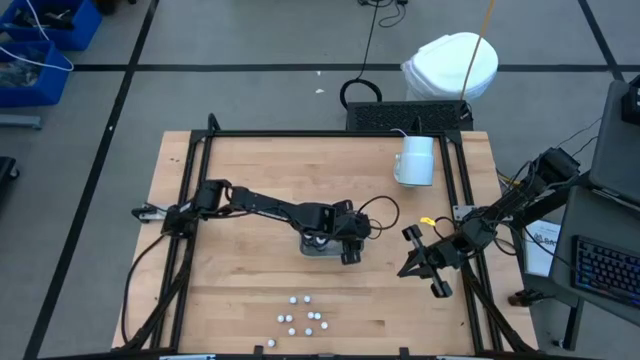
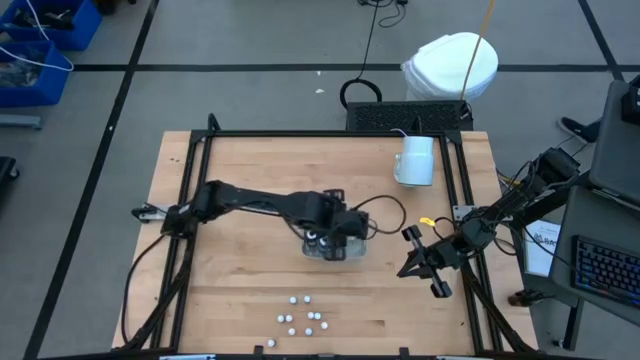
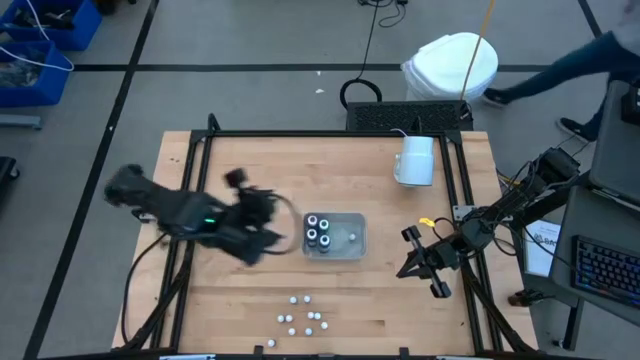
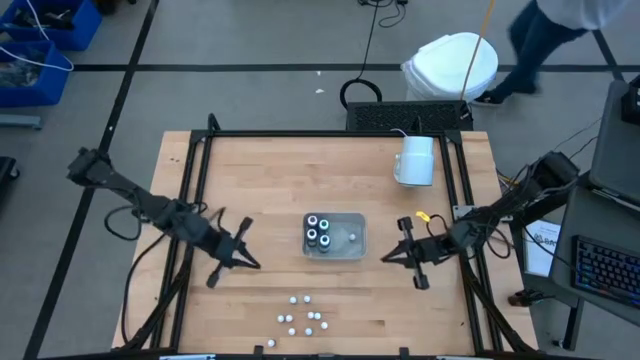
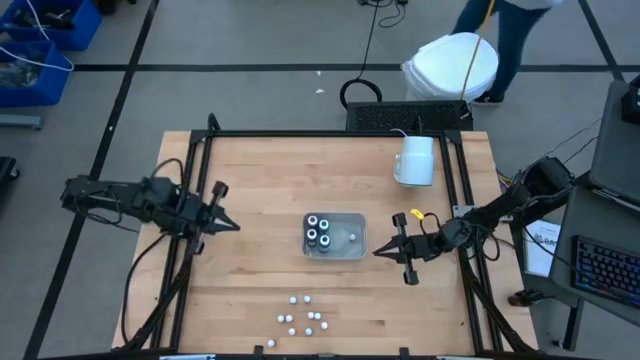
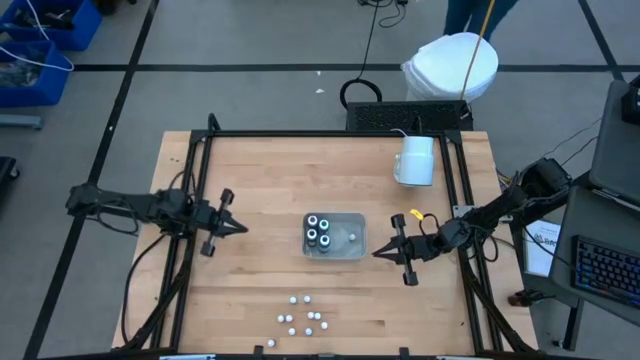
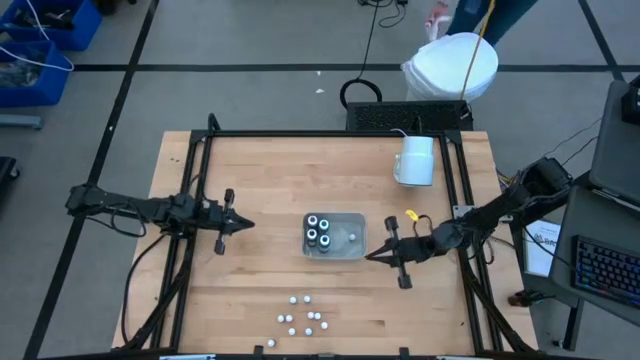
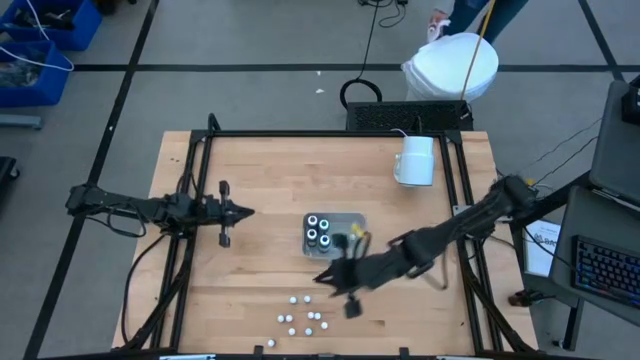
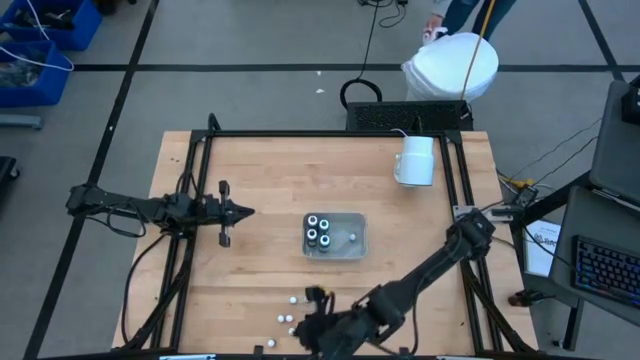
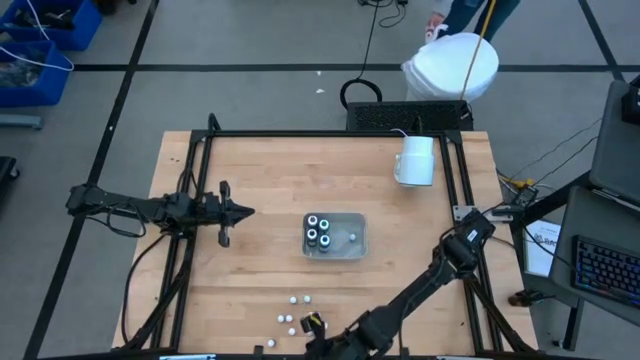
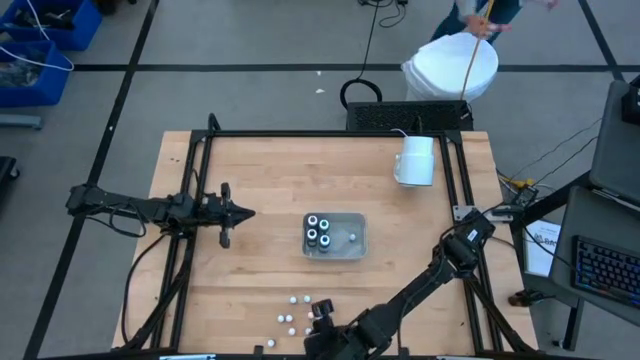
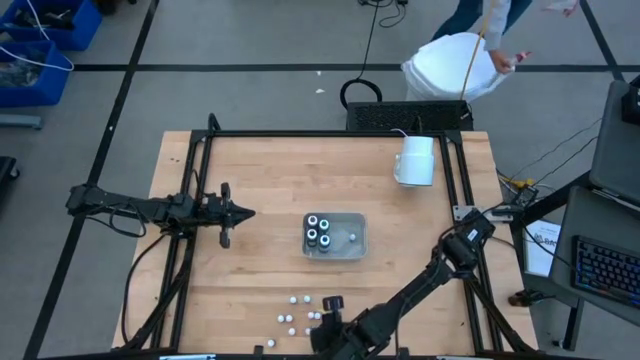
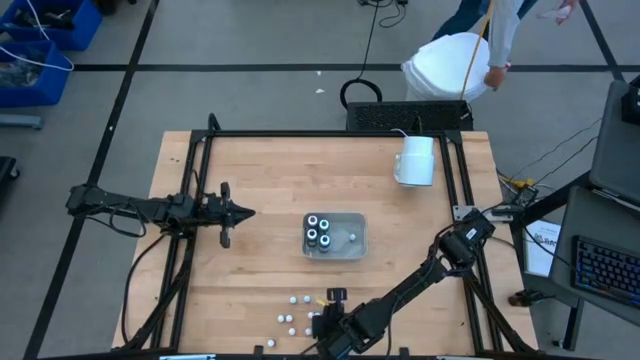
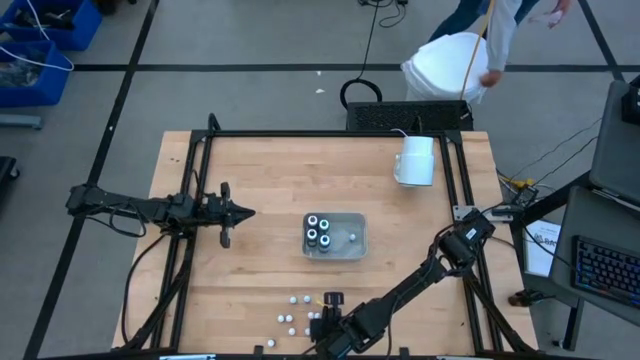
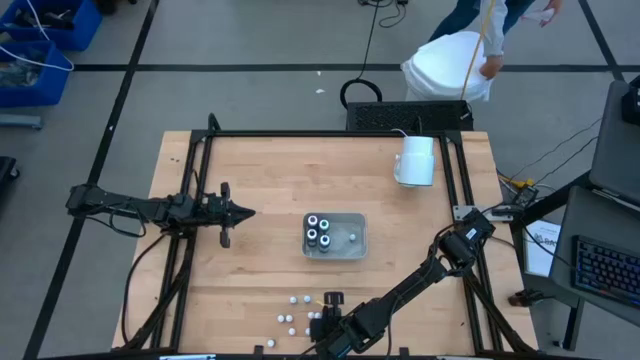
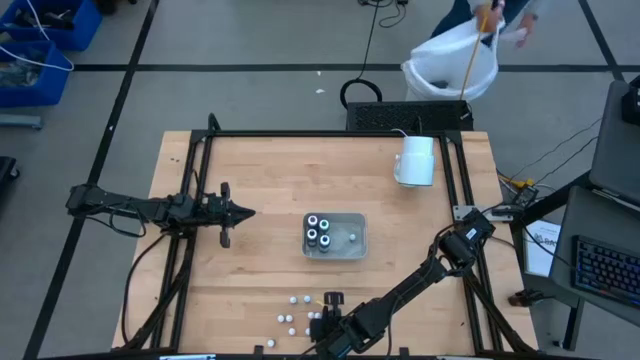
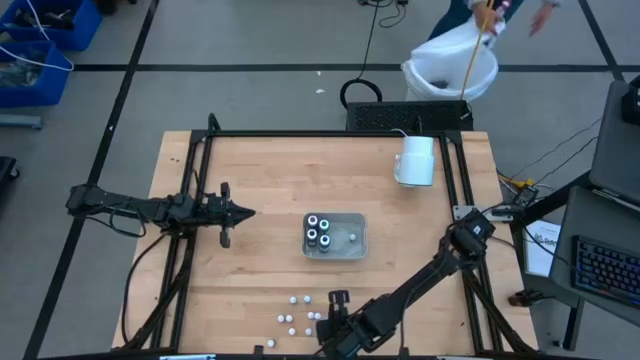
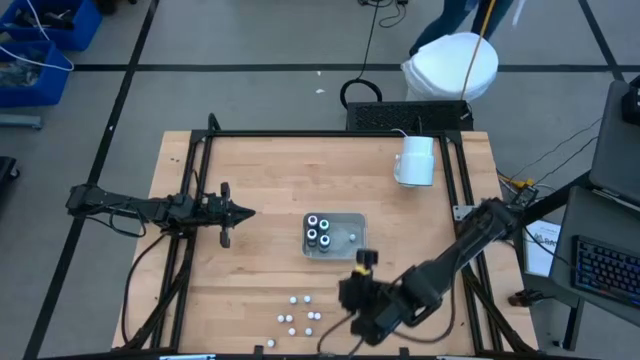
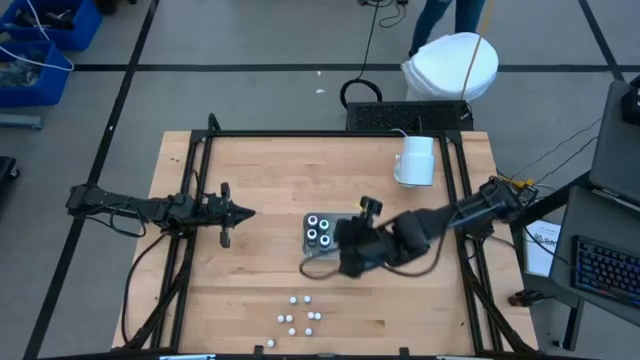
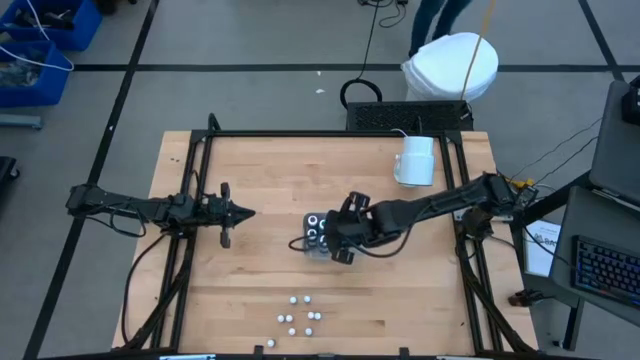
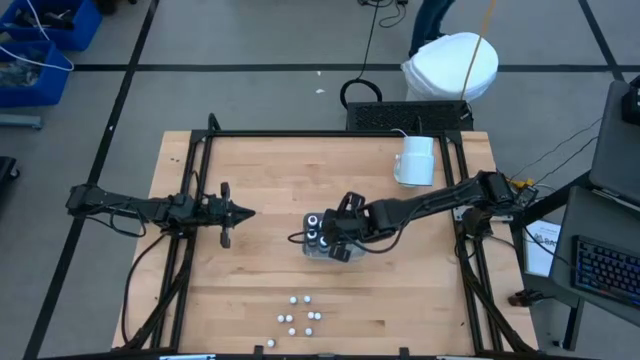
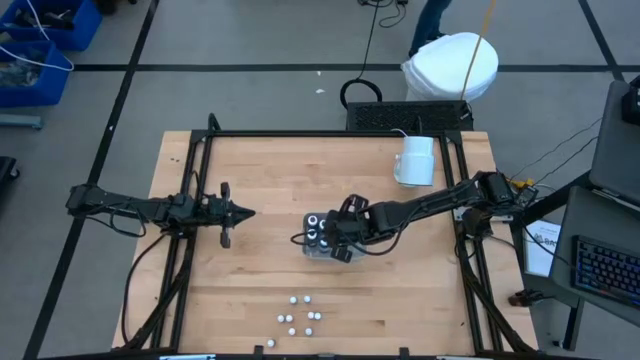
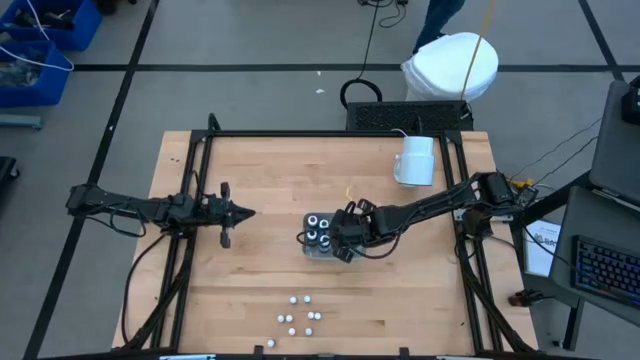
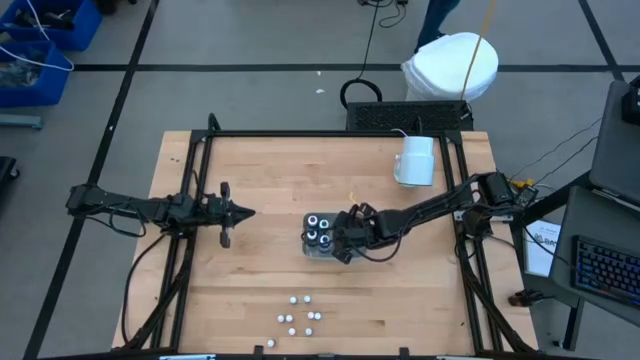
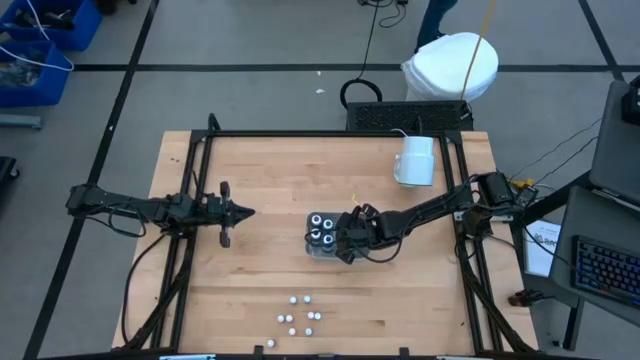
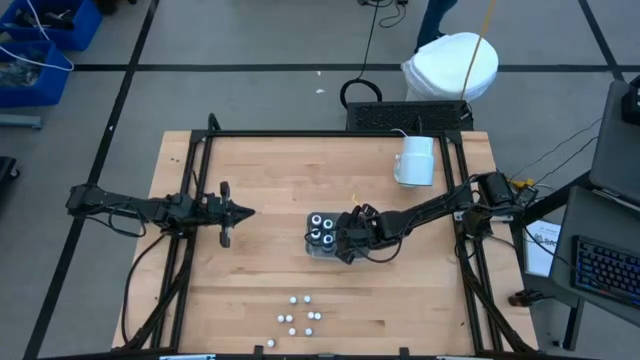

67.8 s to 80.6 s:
Task: Pick & Place food coloring
Put the small orange food coloring into the gray bin

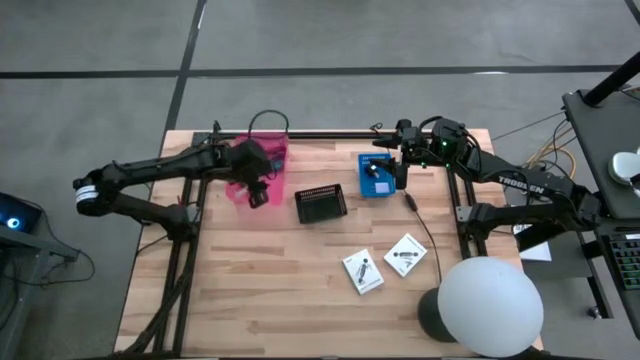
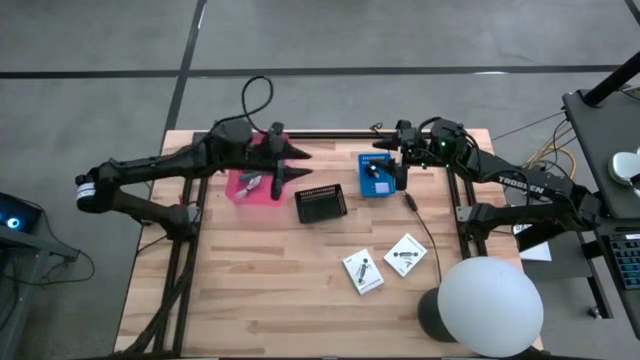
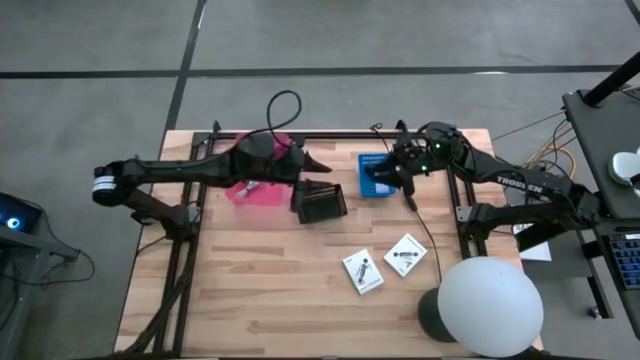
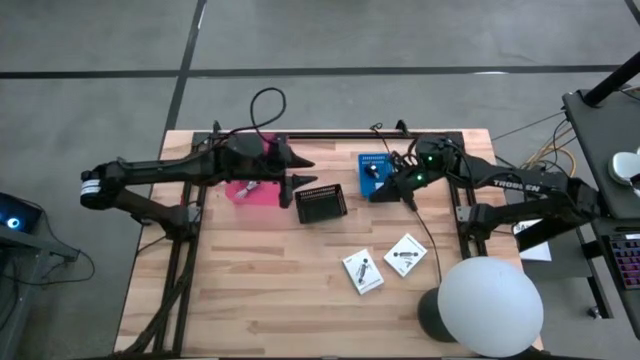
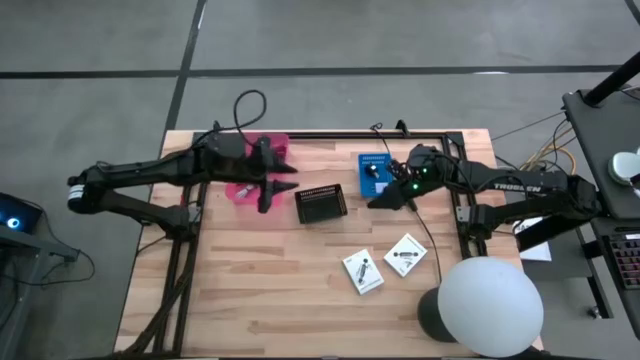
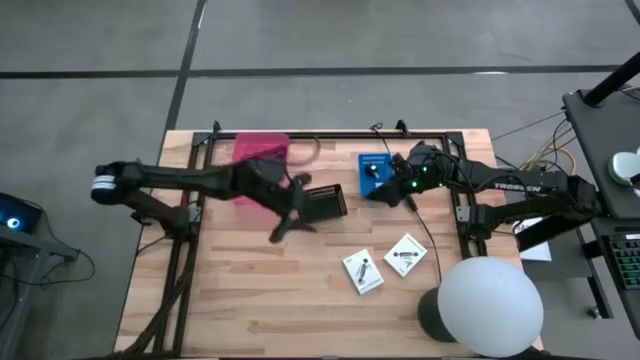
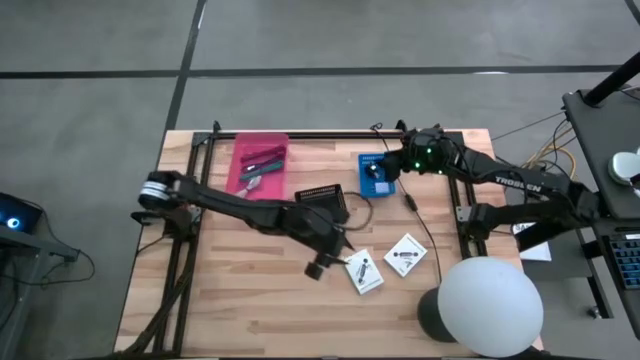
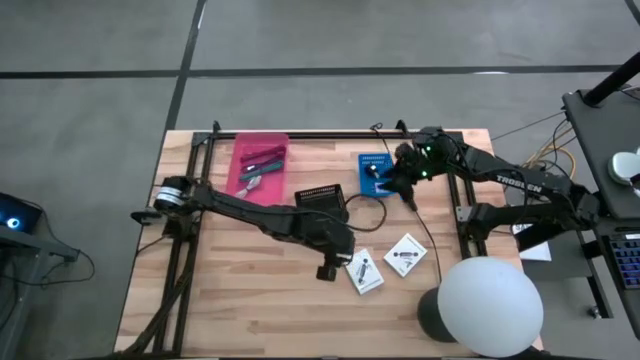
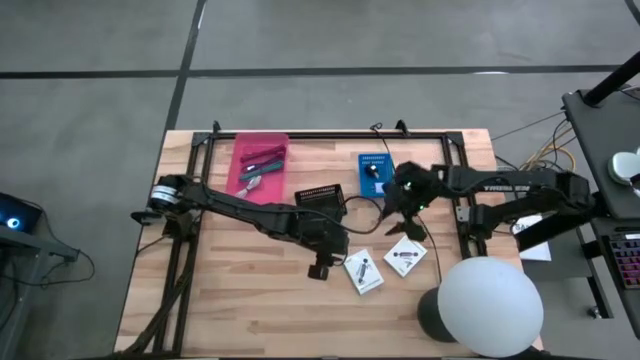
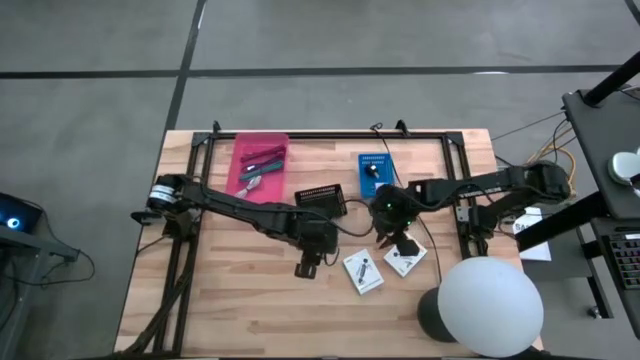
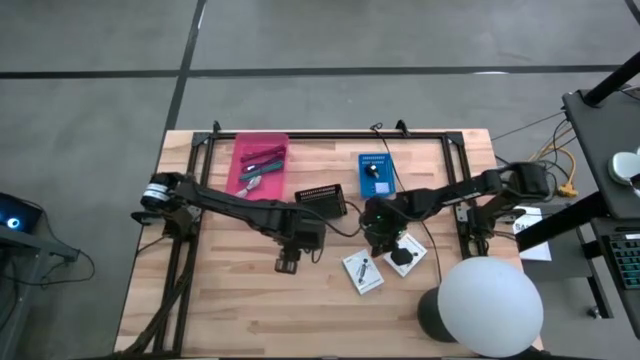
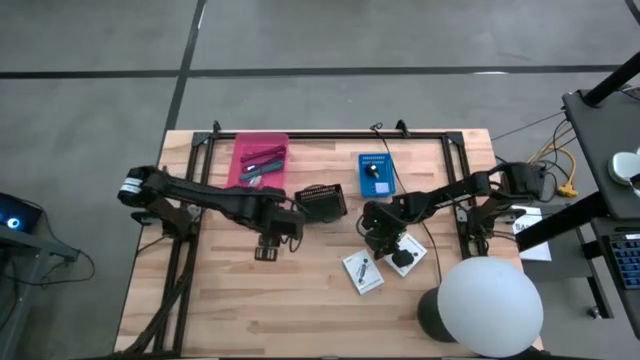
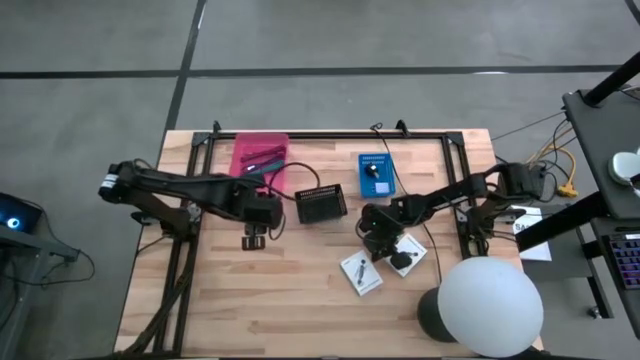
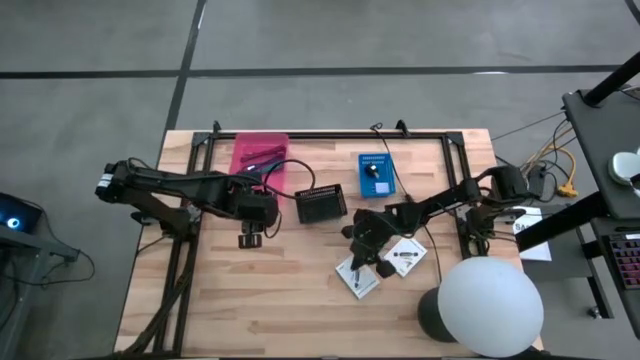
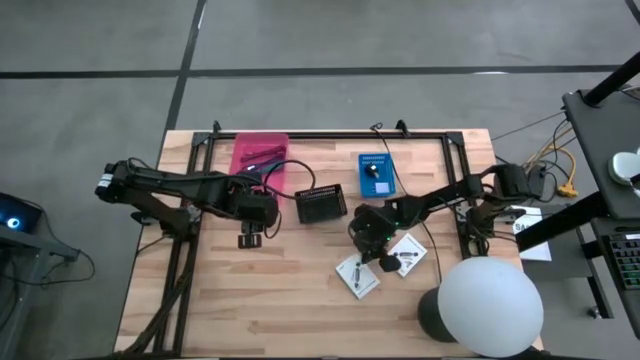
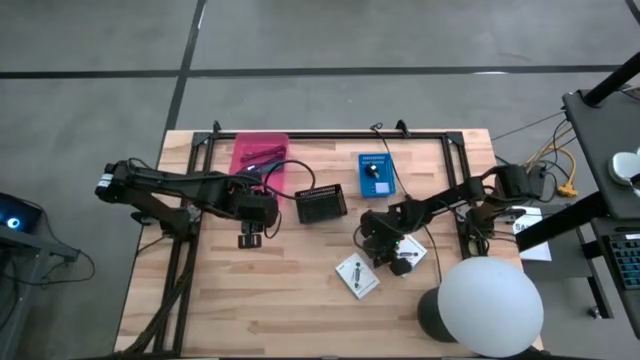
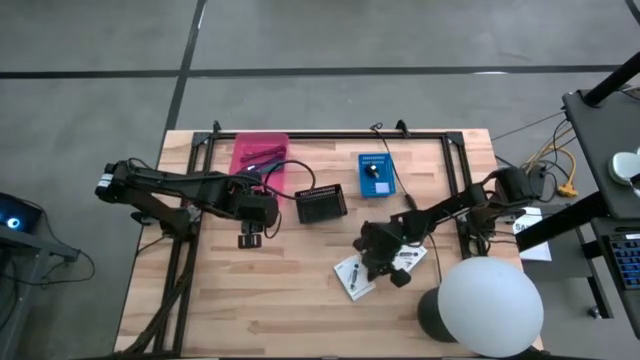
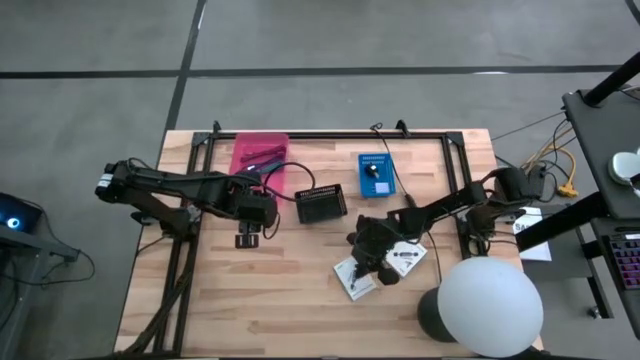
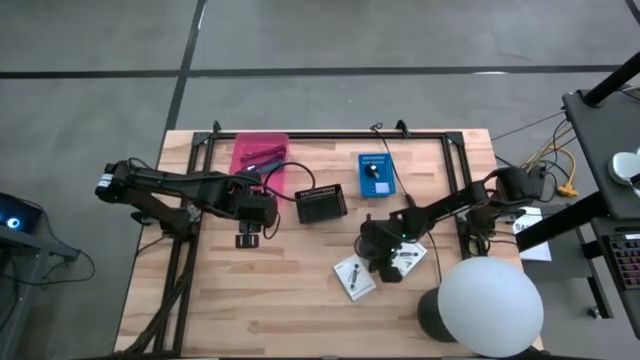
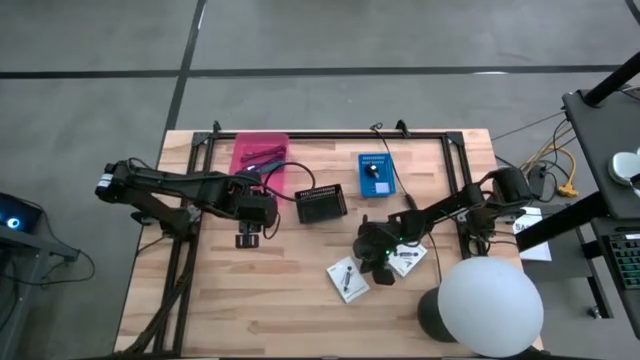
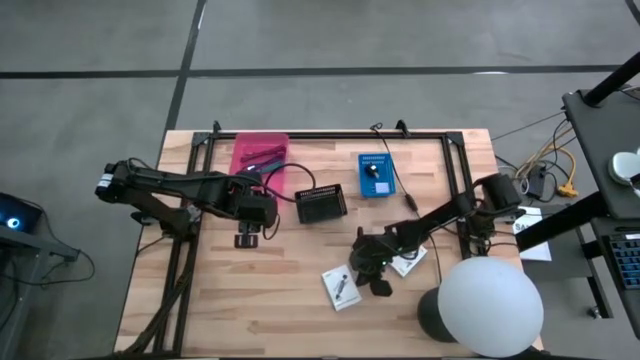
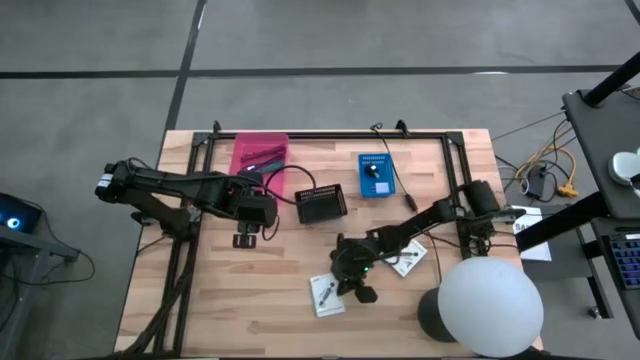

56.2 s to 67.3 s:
Task: Pick and place items into bin
Move the left white card reader box to the center of the table
